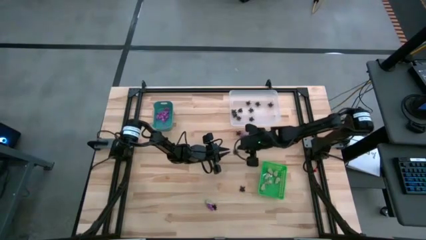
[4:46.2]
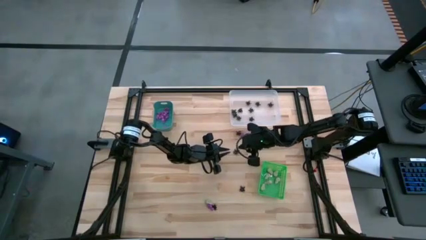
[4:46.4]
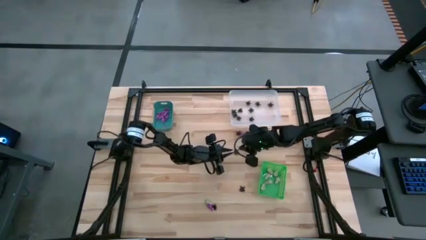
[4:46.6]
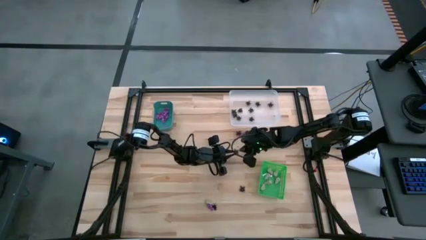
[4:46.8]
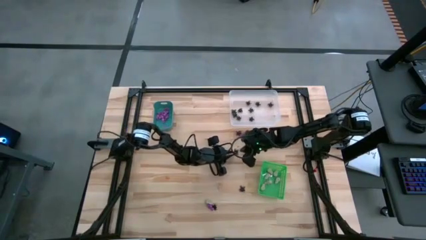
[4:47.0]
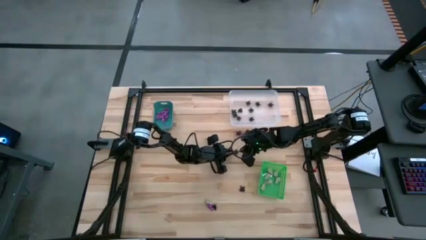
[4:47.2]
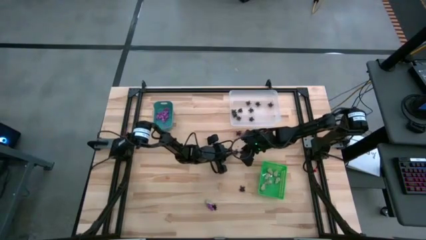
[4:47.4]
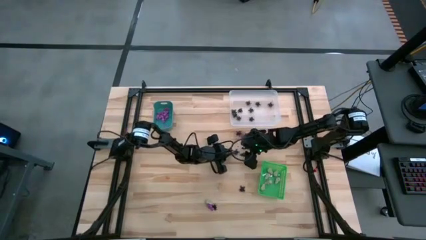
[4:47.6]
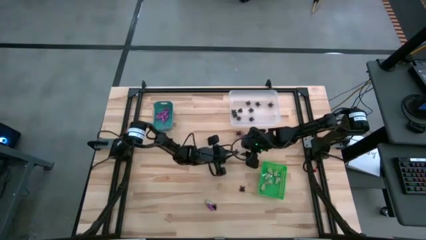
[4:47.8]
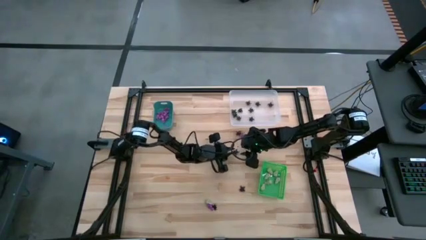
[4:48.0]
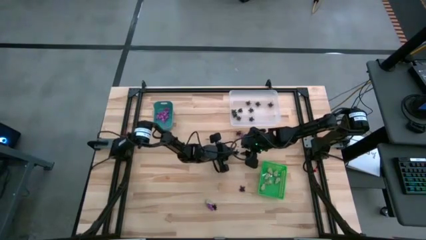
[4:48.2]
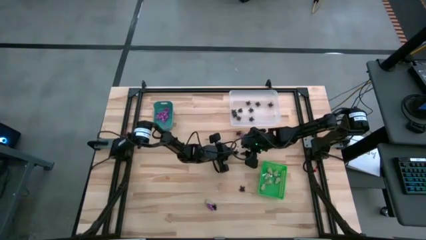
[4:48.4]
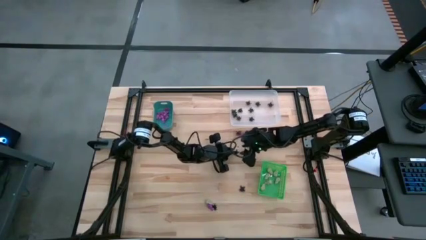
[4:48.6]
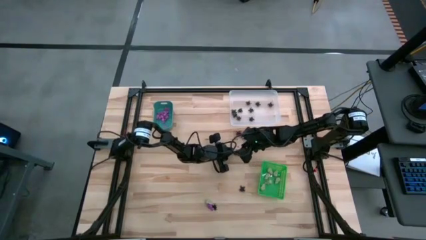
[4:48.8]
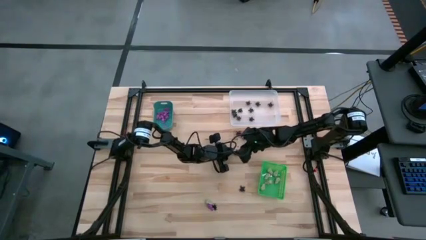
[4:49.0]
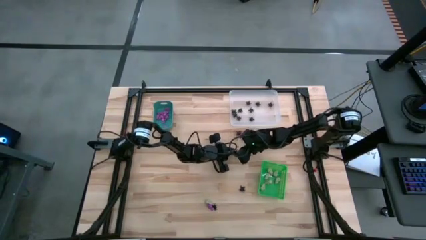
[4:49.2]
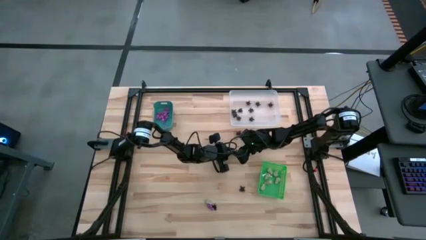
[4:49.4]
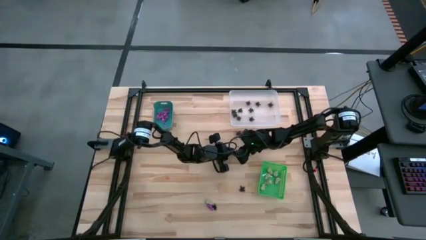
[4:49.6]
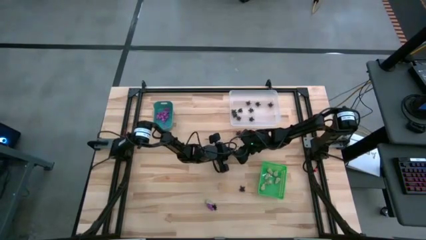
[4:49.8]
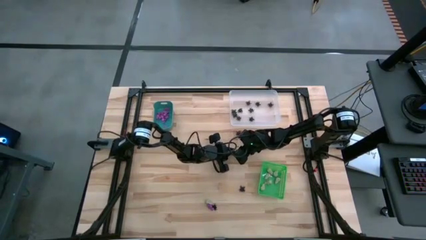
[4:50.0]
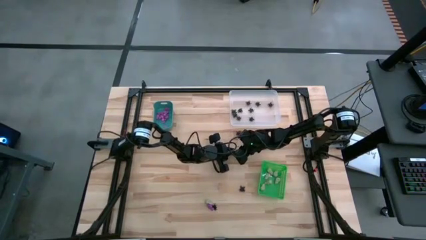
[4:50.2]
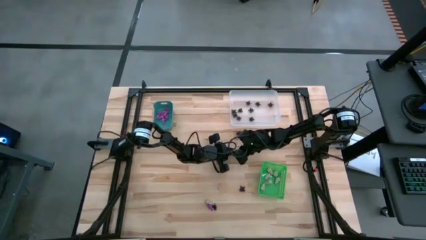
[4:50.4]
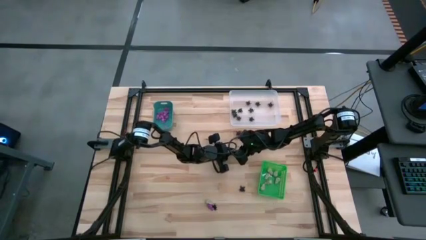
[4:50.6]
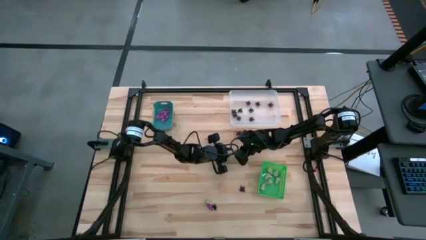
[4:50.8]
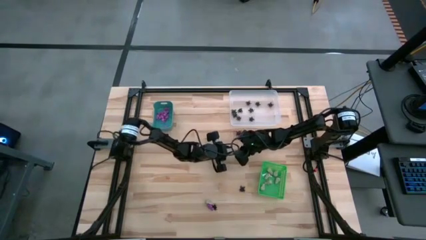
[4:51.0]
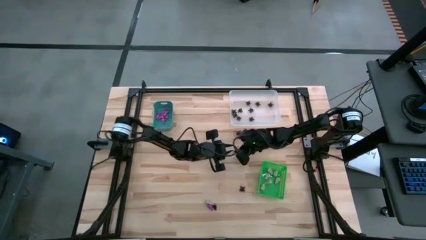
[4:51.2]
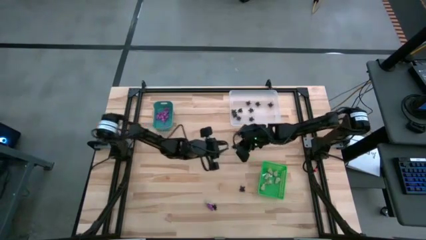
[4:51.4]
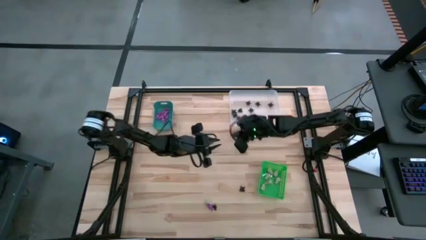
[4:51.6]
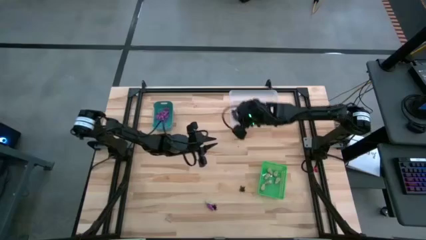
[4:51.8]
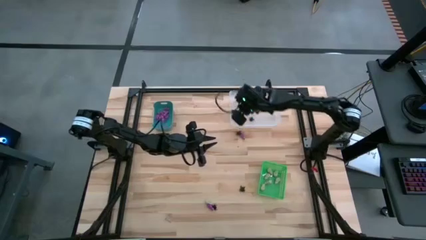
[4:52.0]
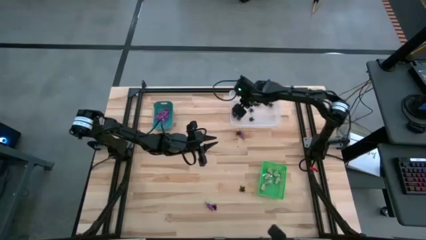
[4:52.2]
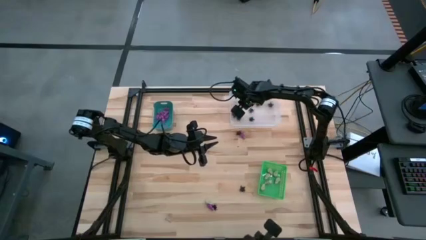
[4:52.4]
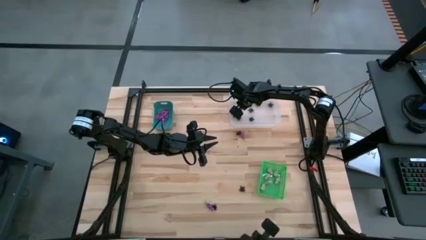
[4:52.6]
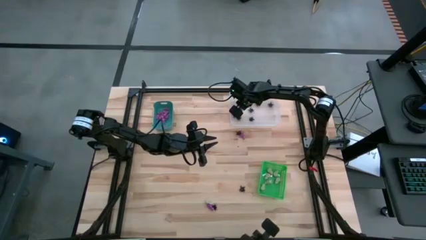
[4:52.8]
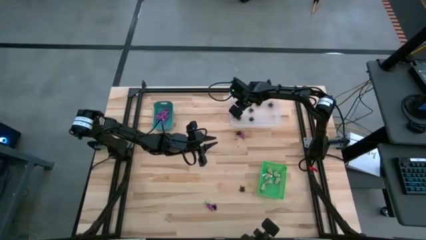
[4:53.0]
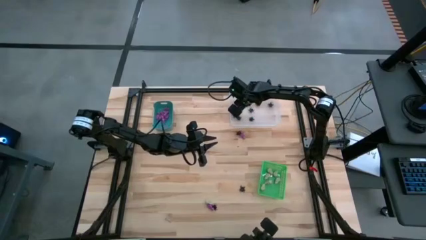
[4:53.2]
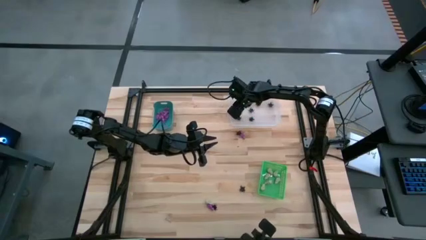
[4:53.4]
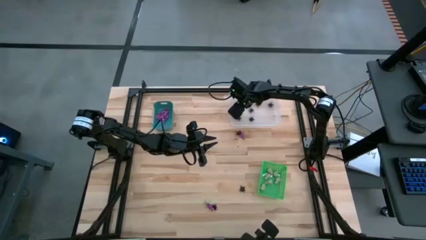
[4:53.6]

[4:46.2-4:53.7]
Task: Sort Halloween decoration
Put the black spider toy into the white bin

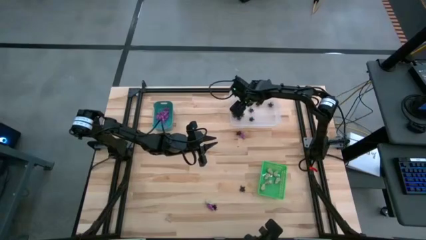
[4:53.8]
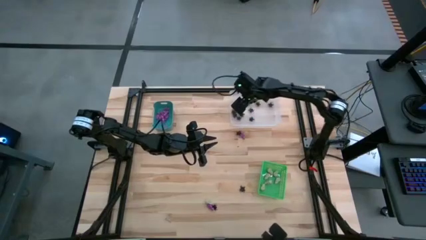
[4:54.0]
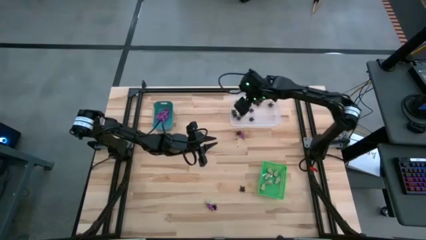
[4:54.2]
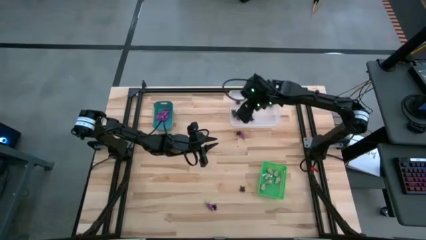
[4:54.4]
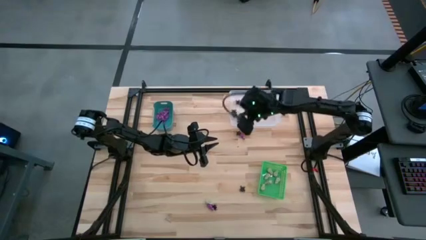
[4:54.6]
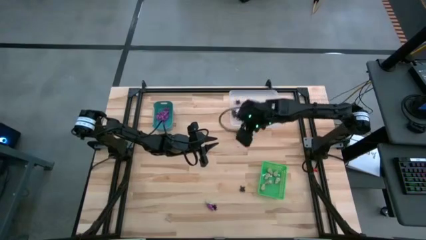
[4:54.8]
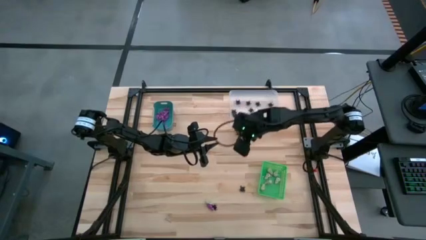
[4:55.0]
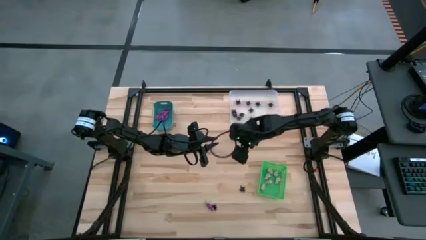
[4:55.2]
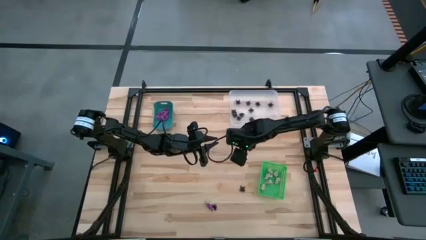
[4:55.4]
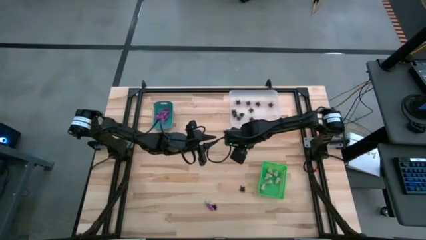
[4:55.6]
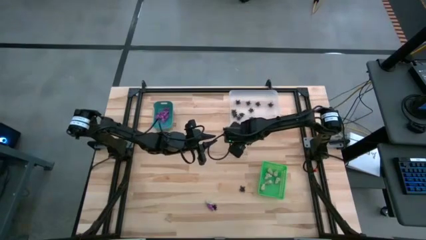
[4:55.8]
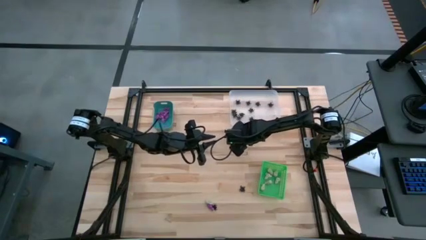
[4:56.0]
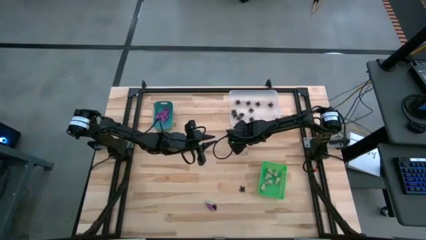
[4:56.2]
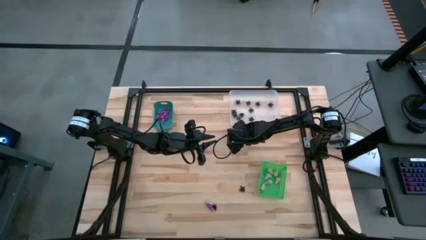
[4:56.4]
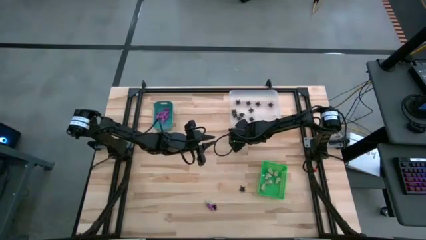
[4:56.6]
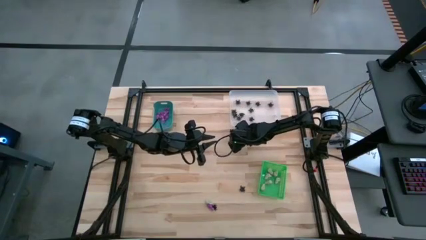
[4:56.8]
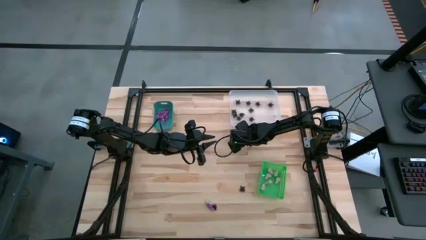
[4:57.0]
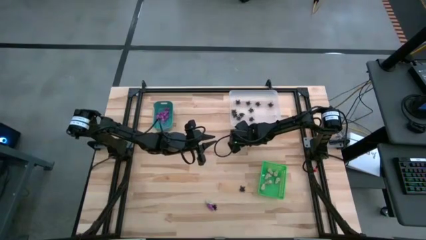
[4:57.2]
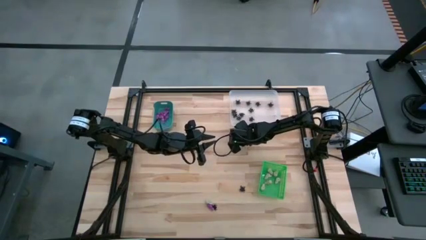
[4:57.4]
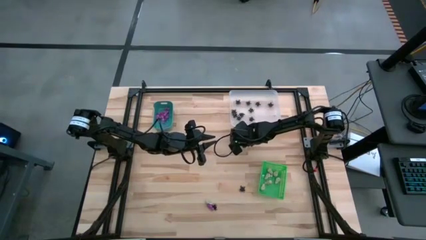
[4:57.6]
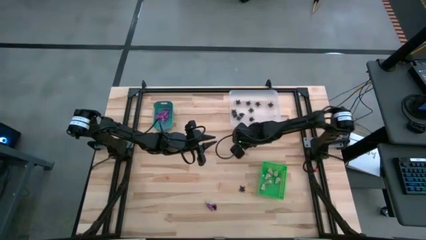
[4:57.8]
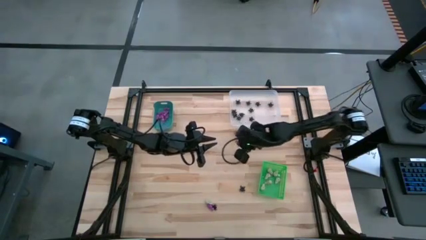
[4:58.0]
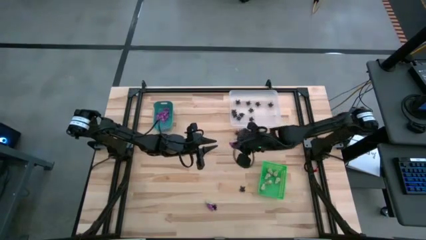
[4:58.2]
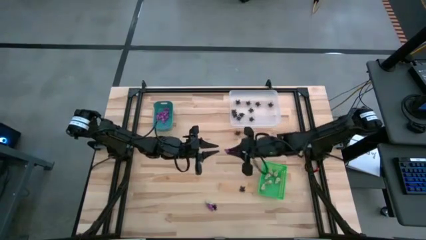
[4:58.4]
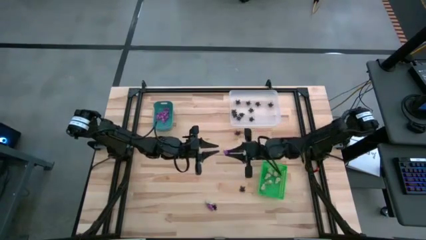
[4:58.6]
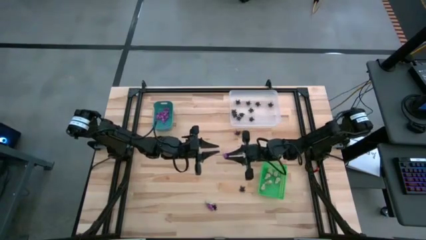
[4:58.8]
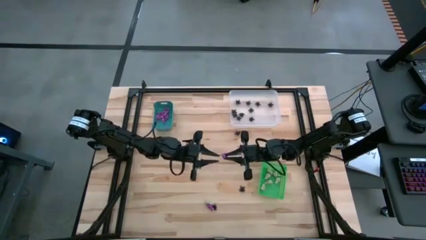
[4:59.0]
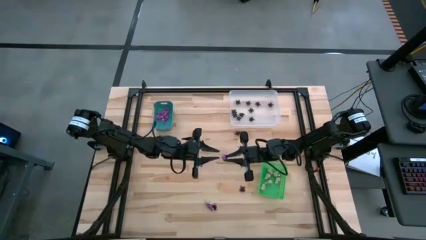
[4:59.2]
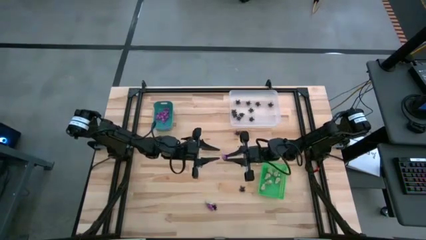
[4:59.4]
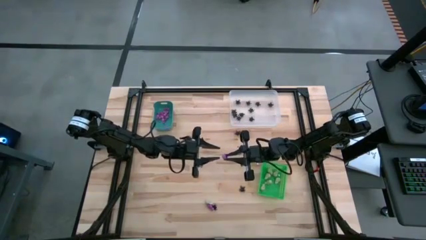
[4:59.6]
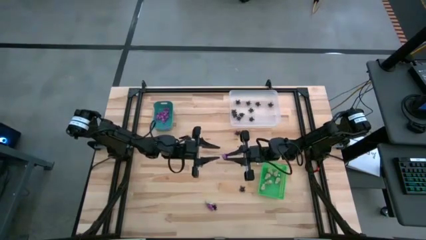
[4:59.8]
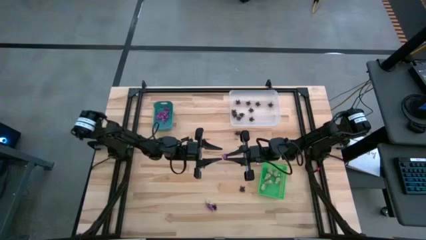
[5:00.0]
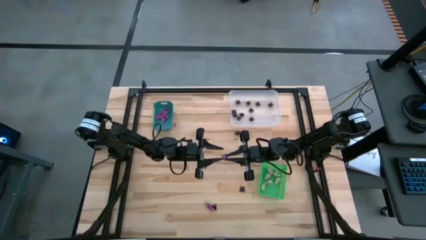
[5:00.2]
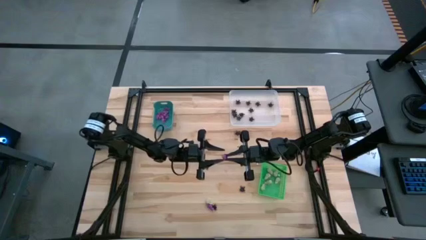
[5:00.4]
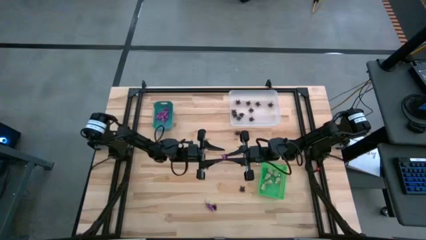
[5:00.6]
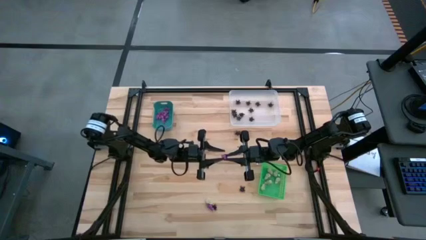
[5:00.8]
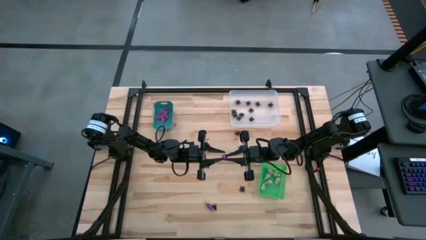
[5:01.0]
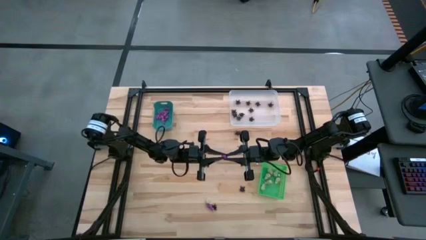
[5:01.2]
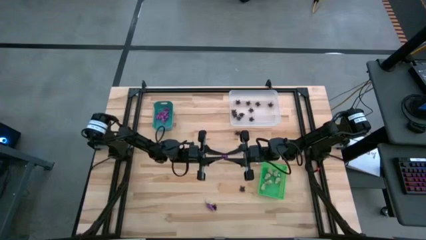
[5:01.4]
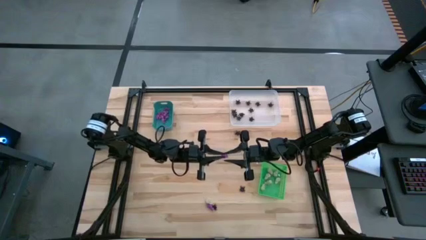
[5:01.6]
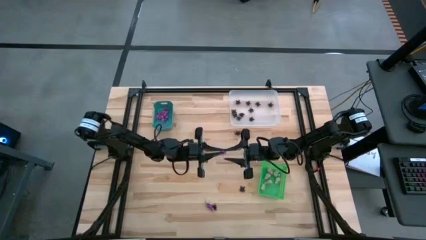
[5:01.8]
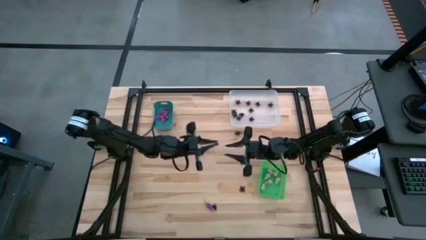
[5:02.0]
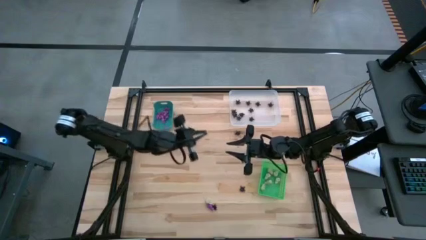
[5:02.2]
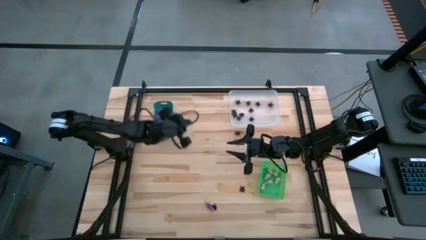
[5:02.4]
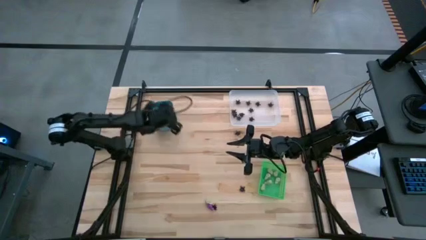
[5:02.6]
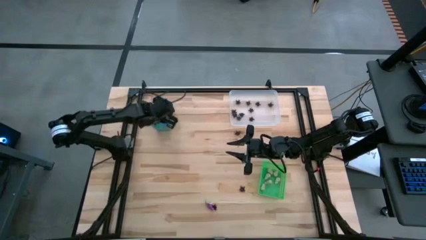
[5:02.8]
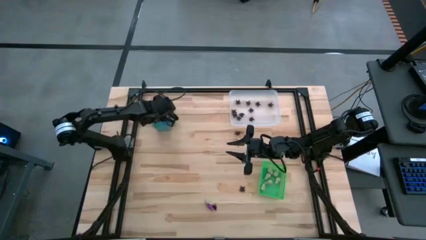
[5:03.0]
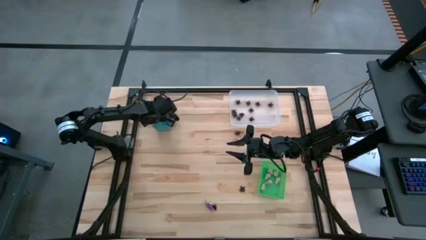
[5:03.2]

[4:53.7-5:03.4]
Put the purple skeleton toy into the blue bin
